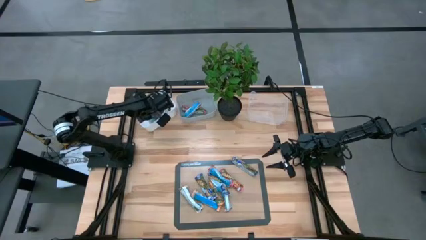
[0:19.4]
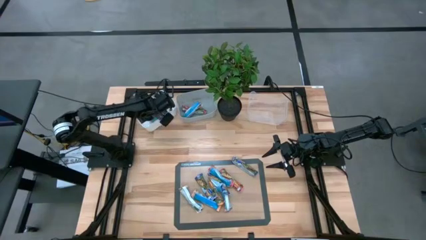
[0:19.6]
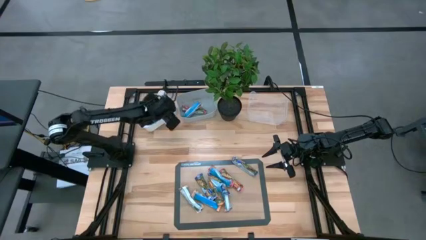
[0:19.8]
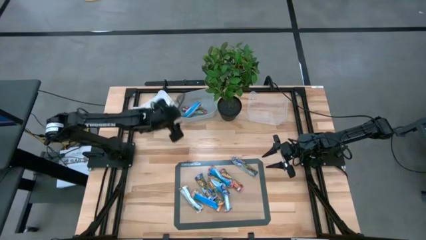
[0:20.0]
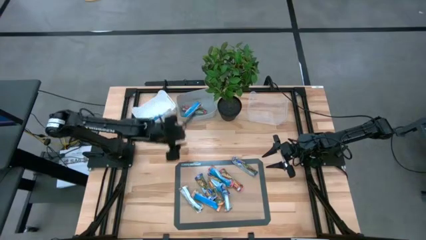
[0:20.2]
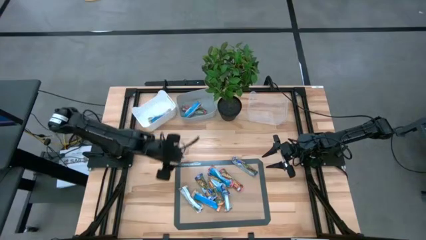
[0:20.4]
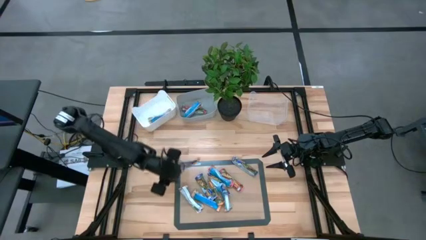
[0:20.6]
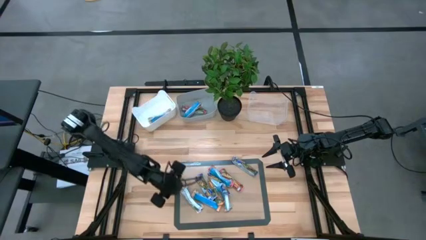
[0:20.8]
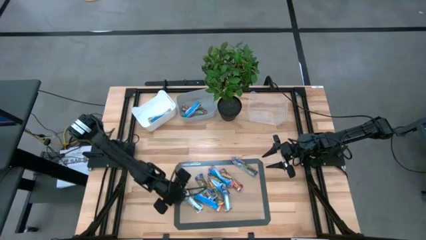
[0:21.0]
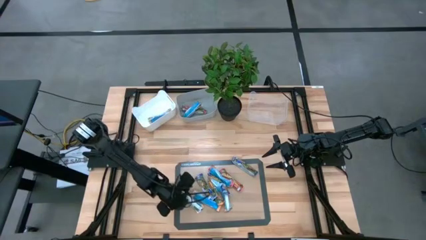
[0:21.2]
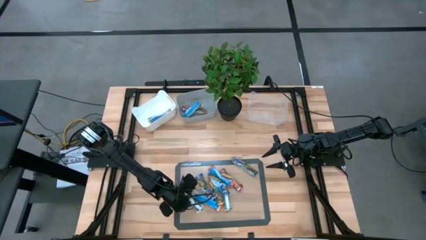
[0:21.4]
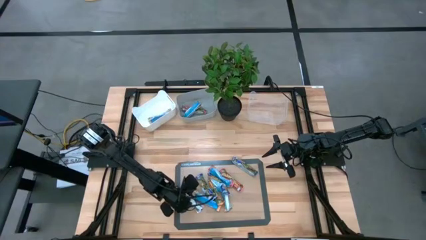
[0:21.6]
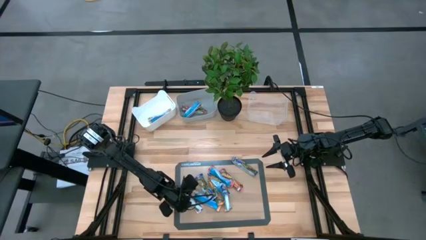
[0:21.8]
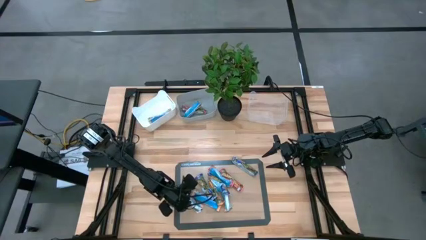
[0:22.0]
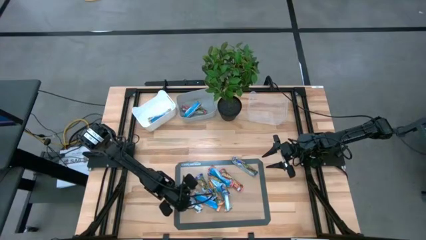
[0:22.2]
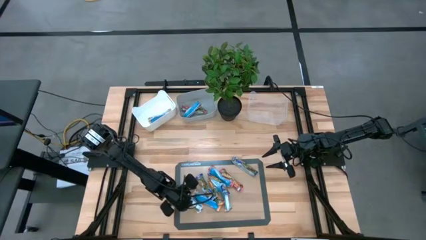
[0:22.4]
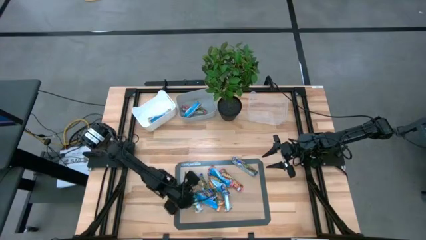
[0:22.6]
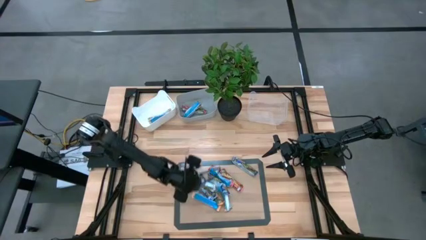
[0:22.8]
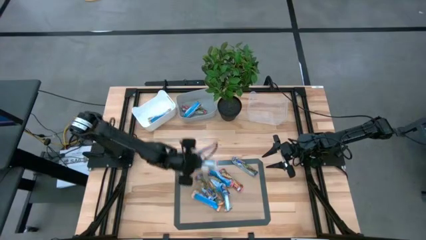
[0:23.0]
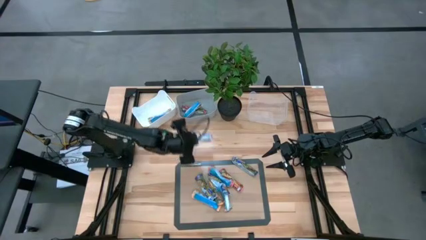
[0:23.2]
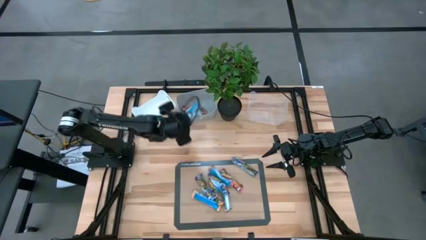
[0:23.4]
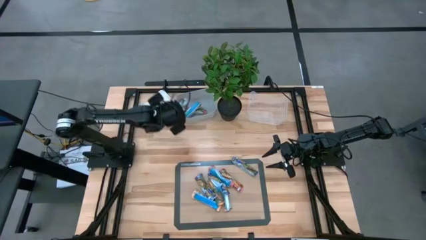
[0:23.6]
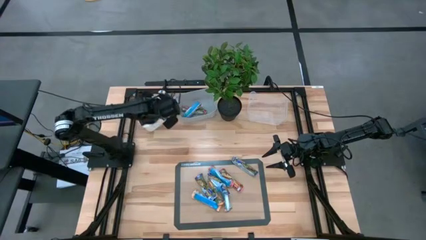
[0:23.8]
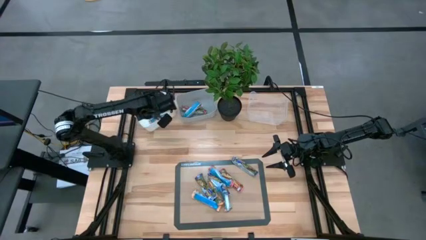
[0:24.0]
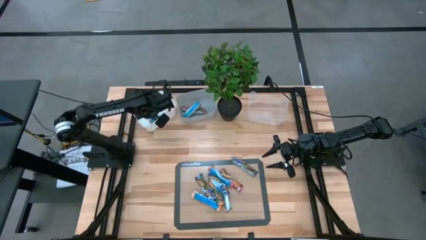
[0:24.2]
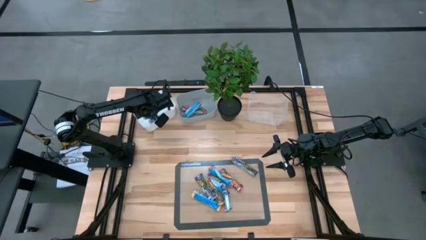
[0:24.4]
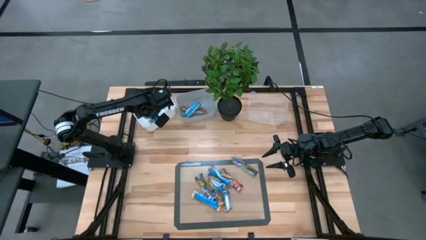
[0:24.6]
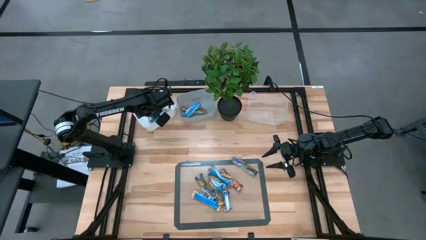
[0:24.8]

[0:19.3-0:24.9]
Task: Pick and place Granola Bars by type
Put the yellow granola bar into the white bin

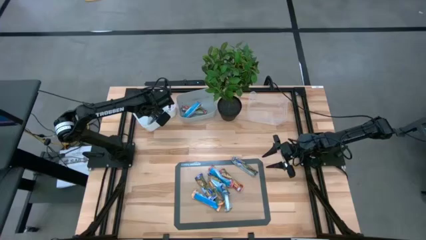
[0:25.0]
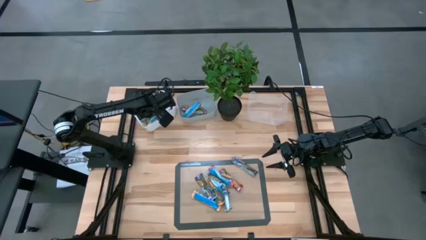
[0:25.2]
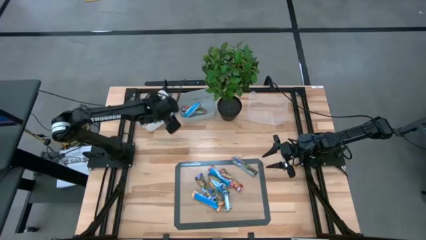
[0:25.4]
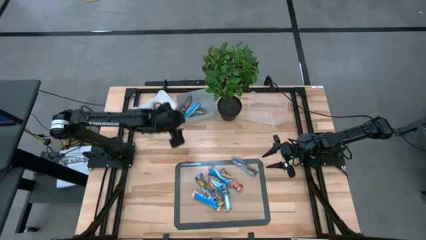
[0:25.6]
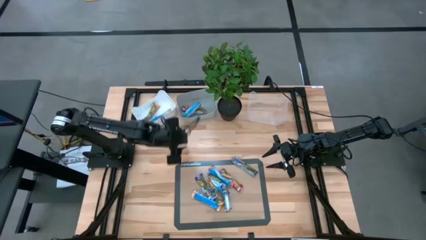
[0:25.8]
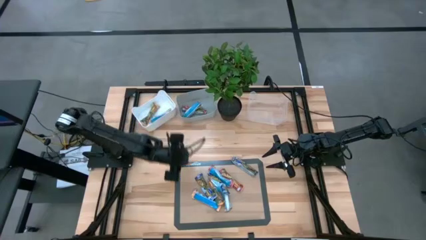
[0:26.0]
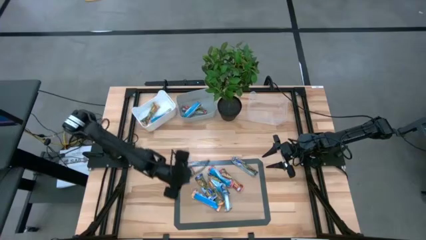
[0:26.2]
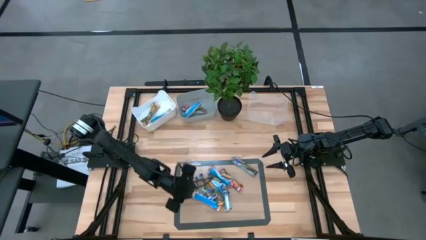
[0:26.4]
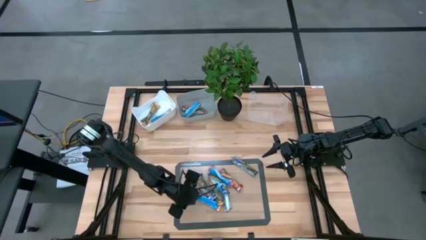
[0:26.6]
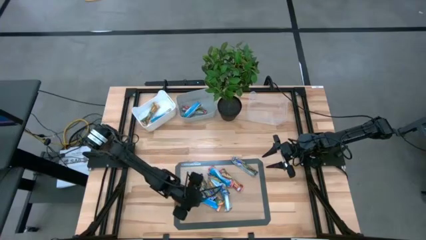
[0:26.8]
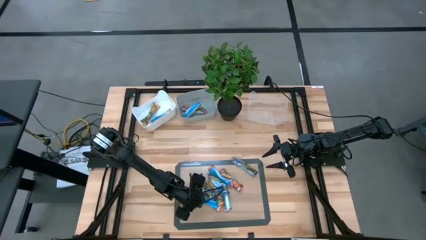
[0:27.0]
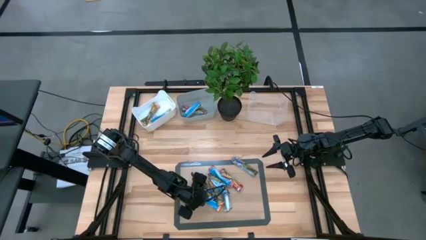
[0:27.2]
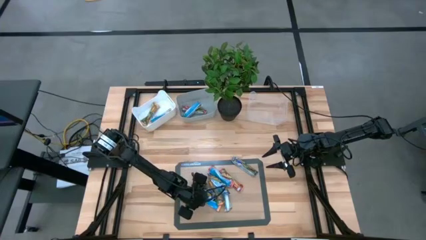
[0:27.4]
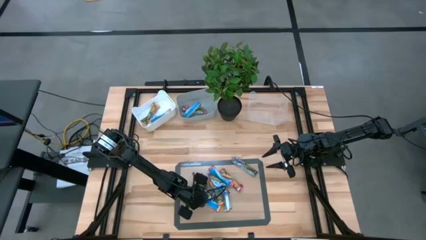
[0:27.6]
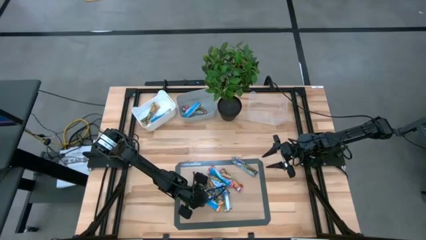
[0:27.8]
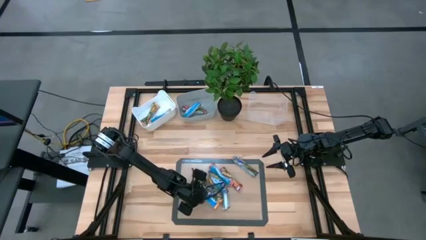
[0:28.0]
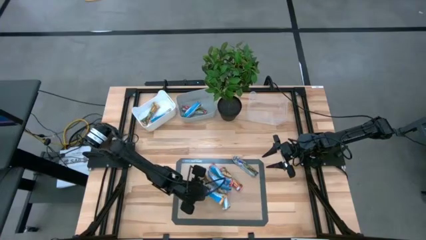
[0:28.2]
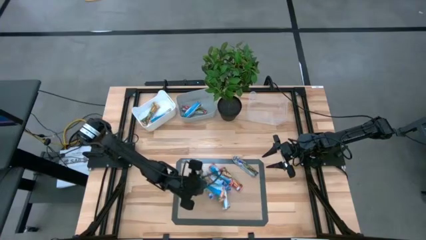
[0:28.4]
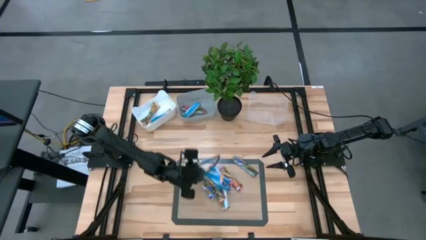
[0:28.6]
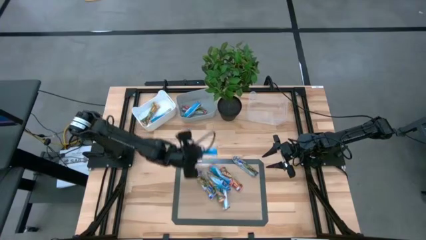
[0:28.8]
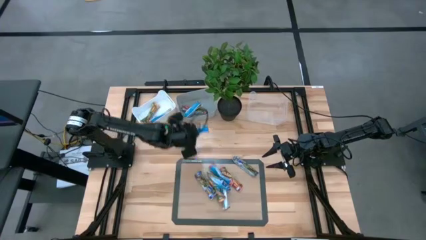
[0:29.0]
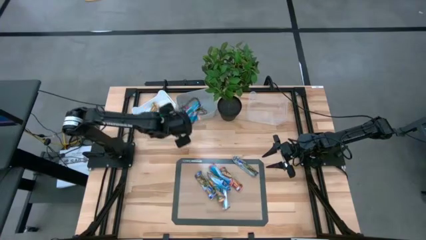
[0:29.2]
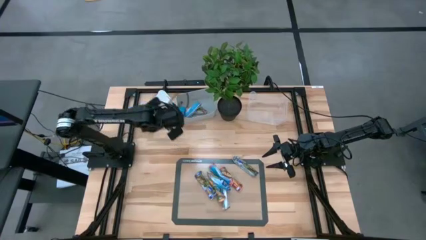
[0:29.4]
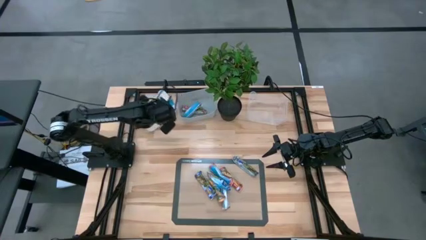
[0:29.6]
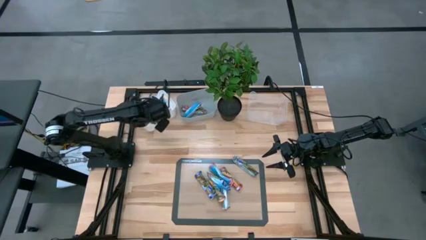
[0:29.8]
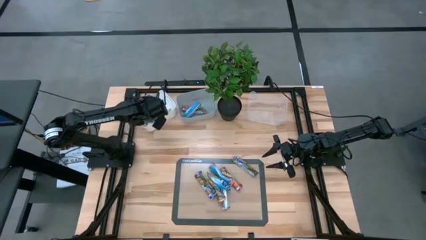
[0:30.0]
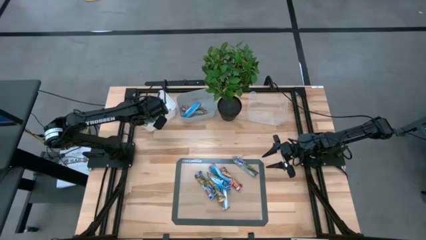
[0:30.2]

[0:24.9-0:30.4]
Put the yellow granola bar into the white bin

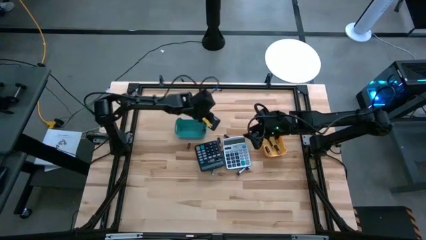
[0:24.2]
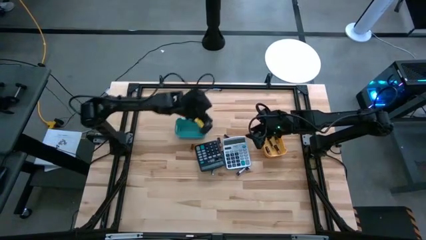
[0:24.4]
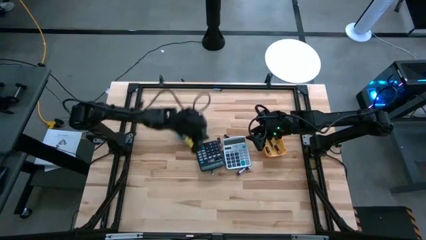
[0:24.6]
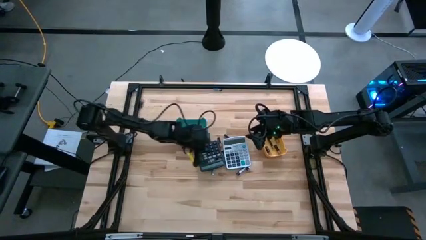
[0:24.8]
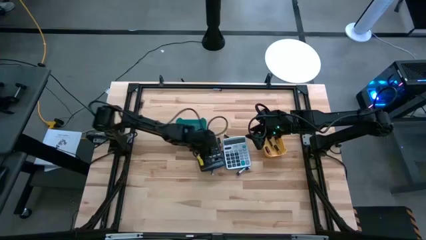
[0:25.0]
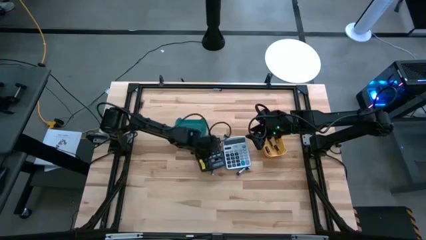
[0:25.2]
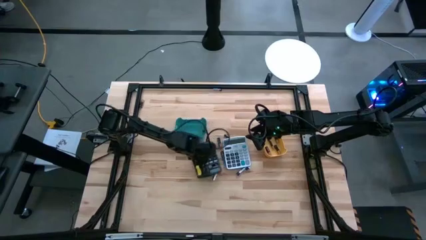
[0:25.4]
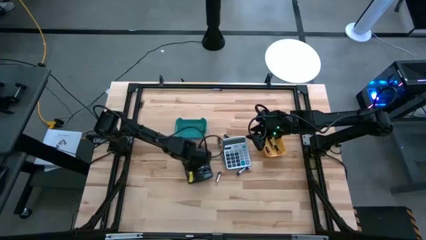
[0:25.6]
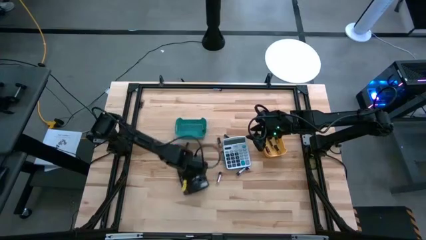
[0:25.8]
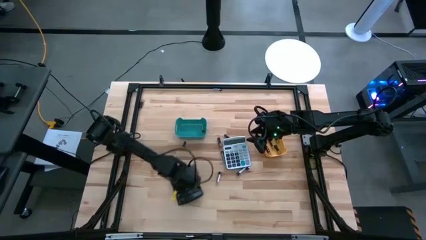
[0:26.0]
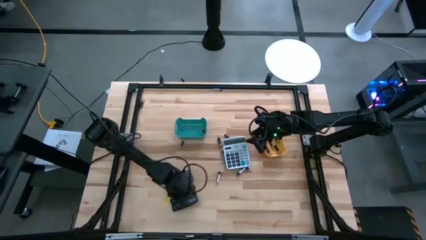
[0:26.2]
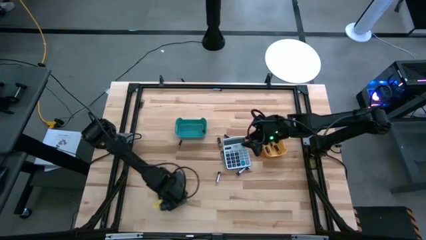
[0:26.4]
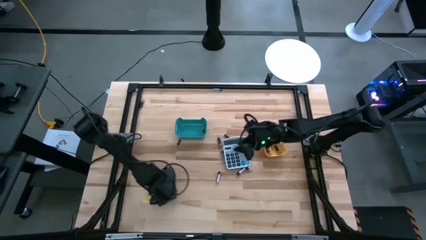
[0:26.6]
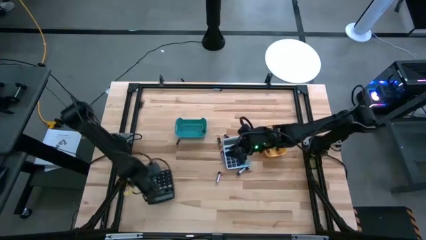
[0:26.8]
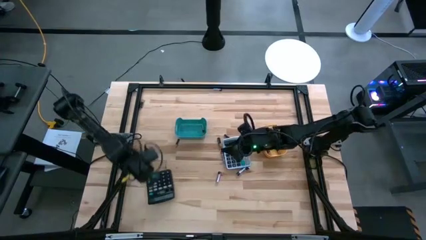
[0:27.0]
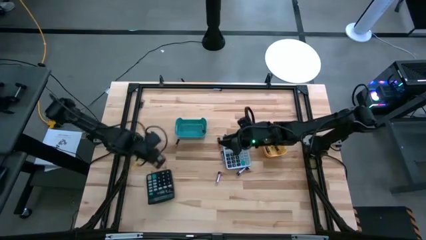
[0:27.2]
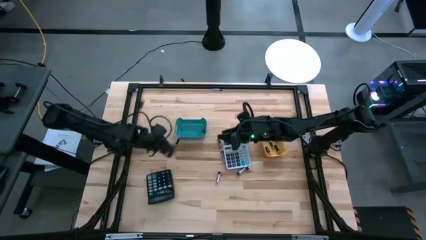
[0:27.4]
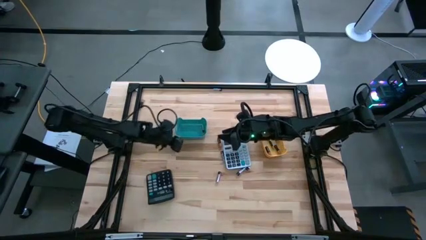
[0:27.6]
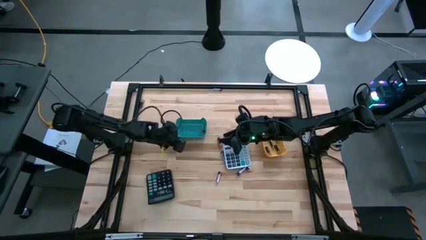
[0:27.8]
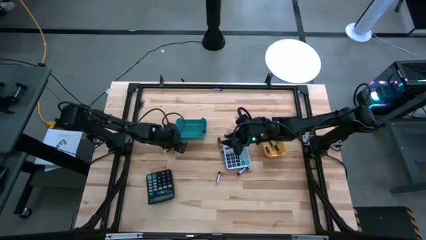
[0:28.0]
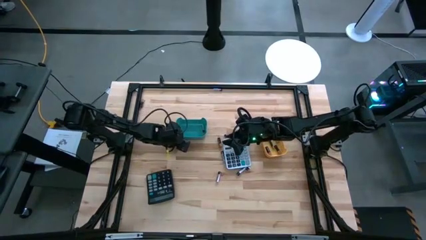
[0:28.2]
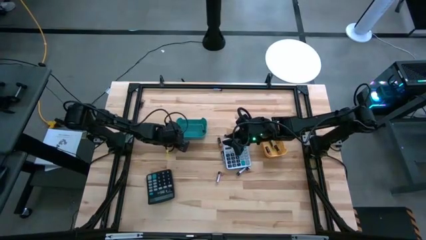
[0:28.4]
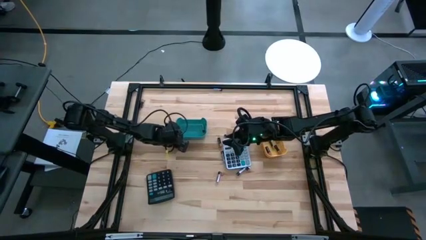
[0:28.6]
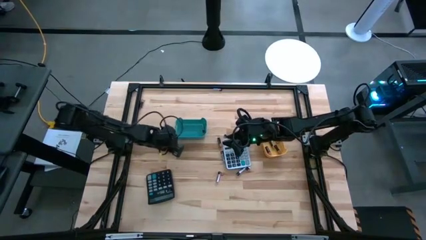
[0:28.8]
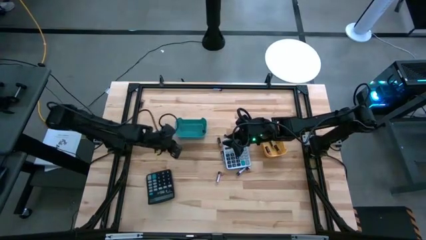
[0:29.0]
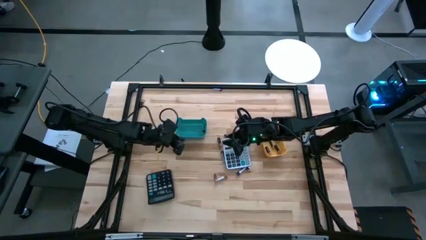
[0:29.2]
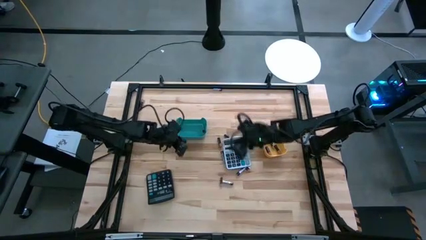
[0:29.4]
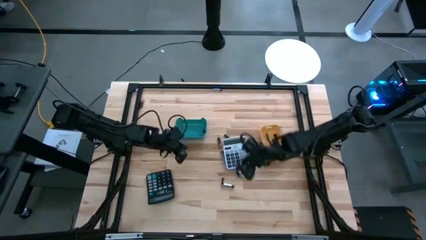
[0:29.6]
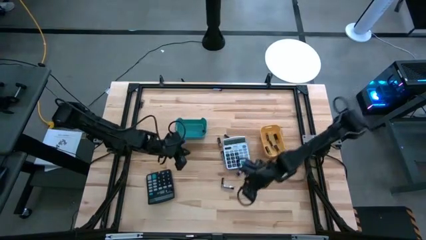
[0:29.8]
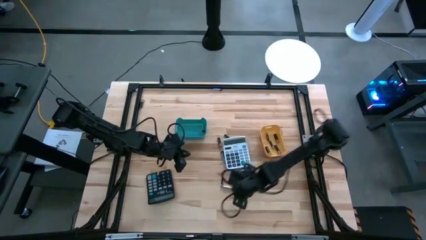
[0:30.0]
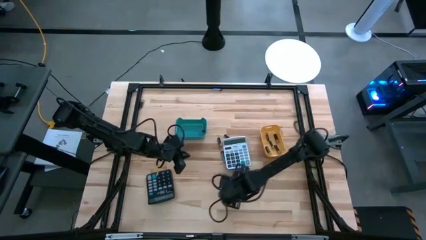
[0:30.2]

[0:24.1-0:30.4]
Task: Sort batteries
Put the black battery into the blue bin
